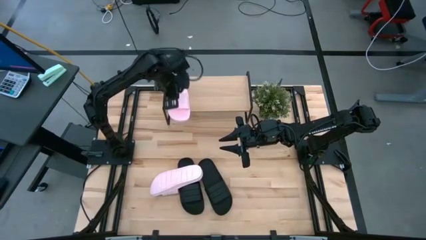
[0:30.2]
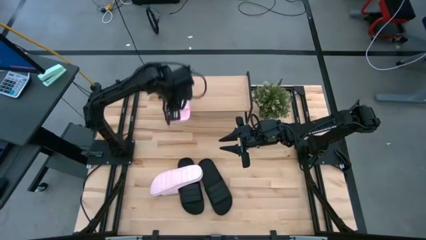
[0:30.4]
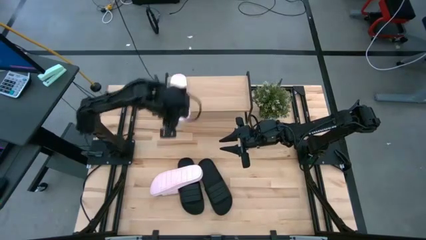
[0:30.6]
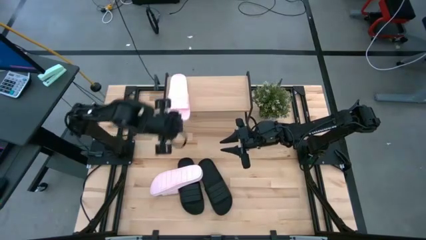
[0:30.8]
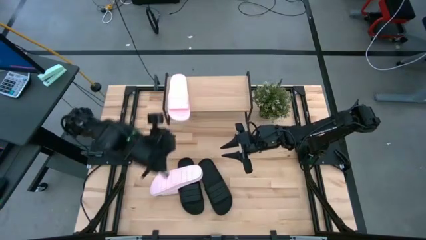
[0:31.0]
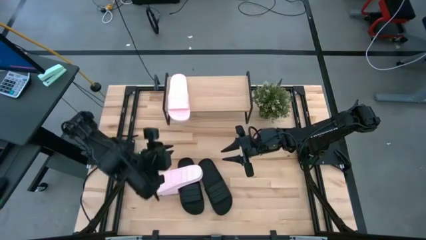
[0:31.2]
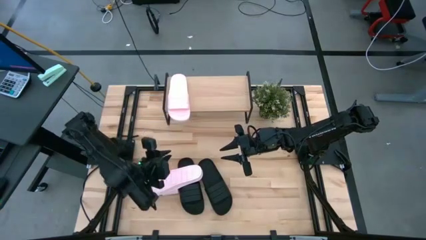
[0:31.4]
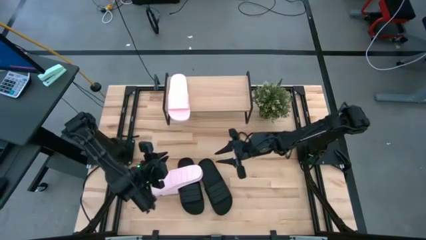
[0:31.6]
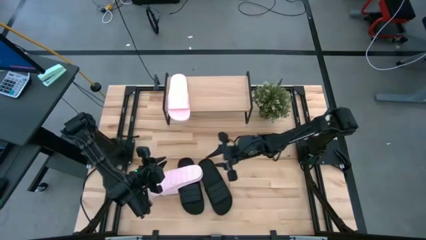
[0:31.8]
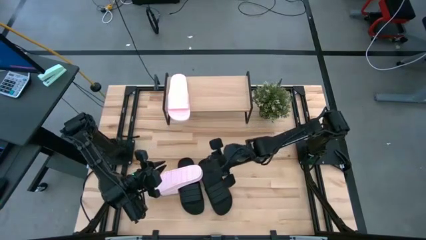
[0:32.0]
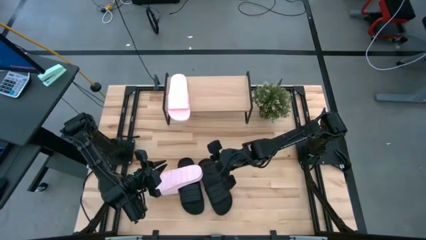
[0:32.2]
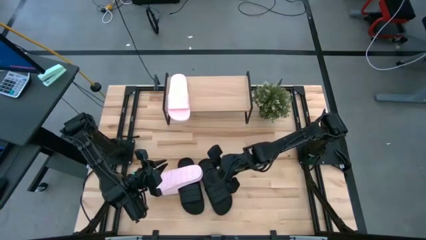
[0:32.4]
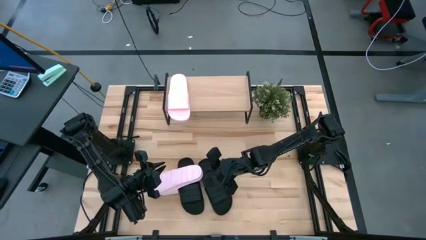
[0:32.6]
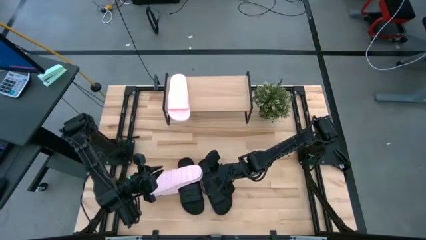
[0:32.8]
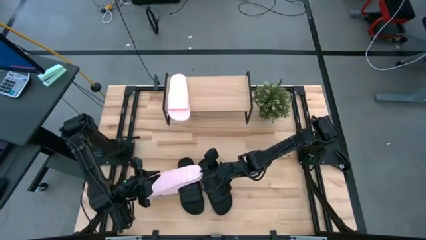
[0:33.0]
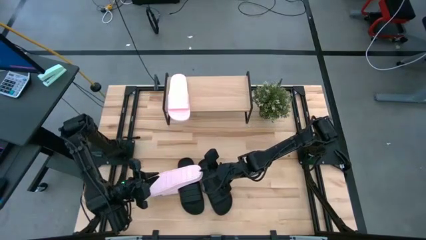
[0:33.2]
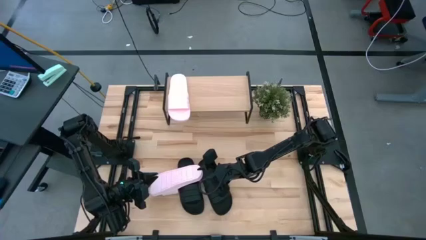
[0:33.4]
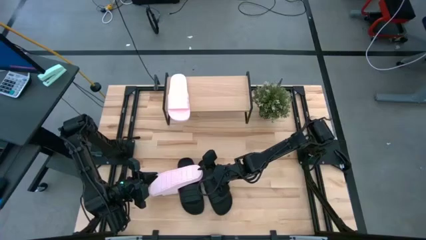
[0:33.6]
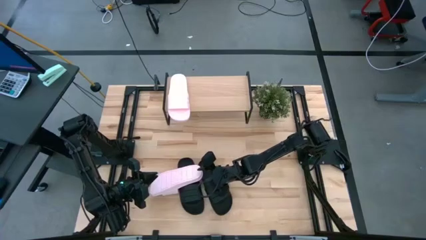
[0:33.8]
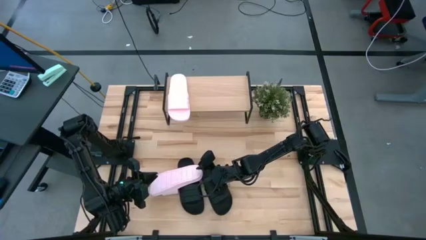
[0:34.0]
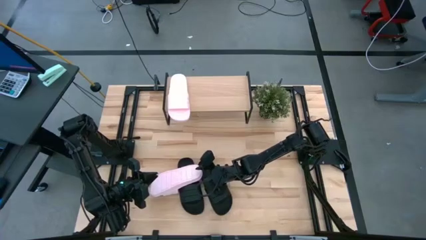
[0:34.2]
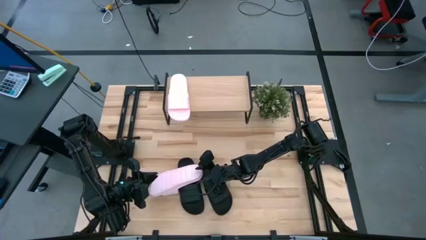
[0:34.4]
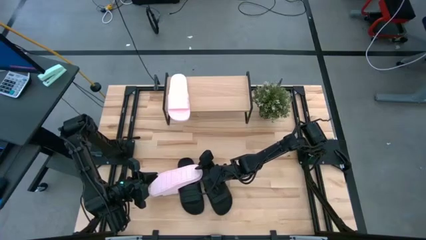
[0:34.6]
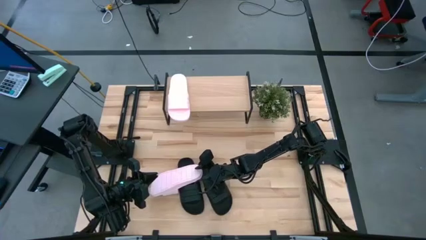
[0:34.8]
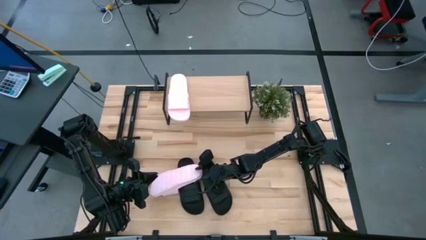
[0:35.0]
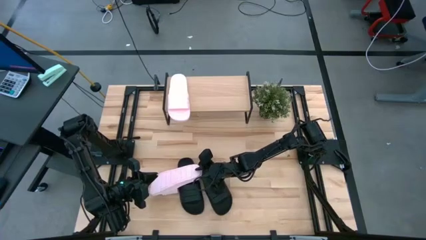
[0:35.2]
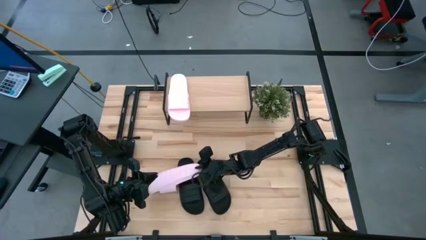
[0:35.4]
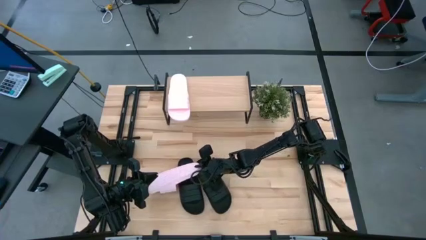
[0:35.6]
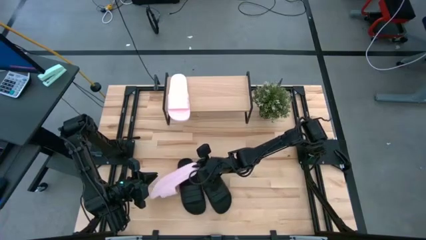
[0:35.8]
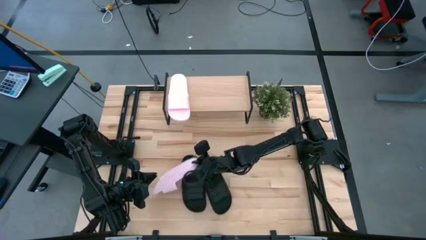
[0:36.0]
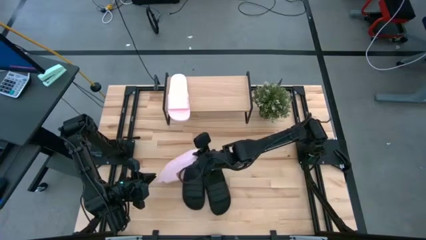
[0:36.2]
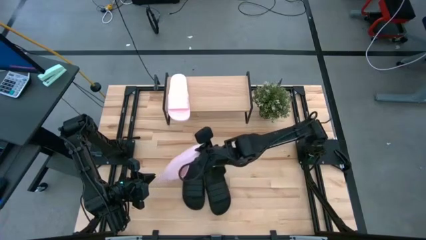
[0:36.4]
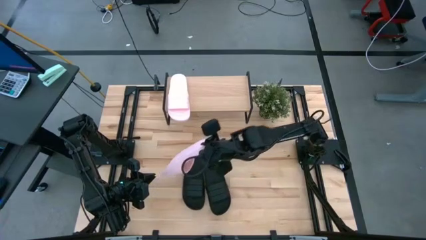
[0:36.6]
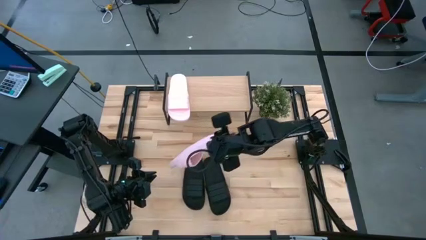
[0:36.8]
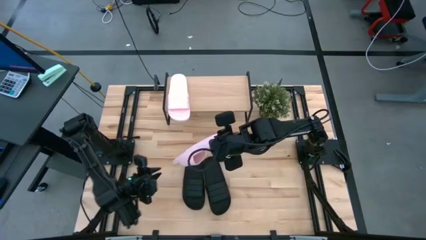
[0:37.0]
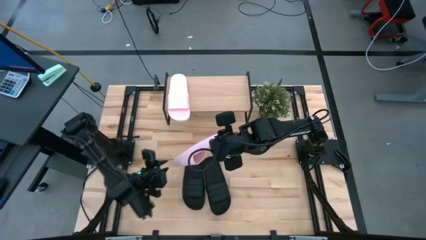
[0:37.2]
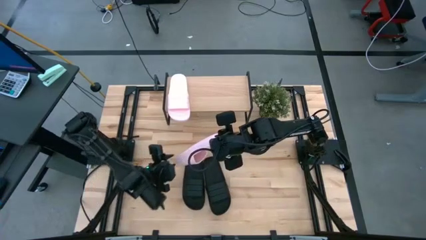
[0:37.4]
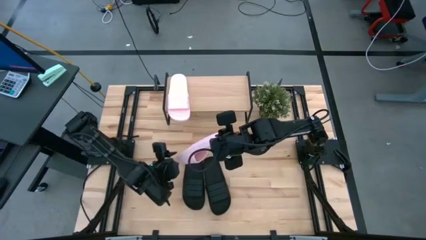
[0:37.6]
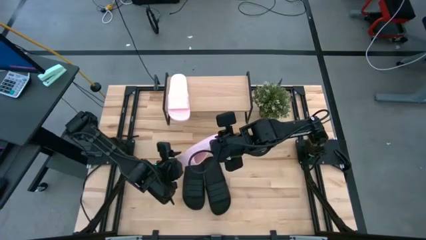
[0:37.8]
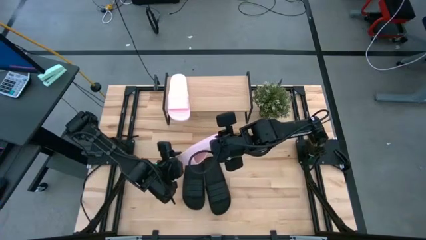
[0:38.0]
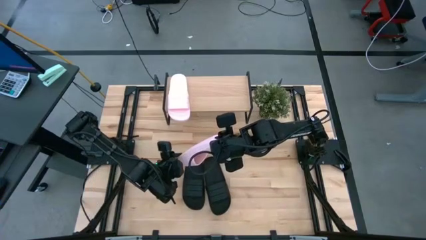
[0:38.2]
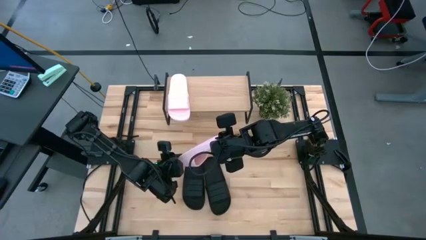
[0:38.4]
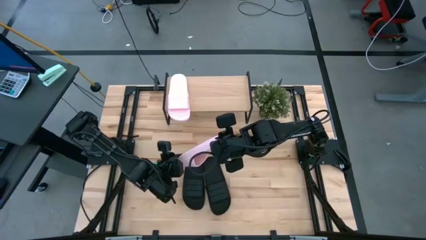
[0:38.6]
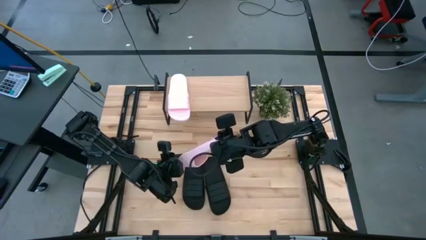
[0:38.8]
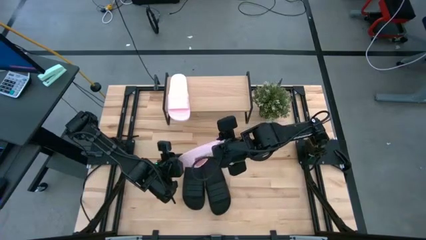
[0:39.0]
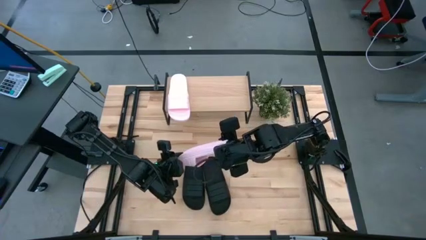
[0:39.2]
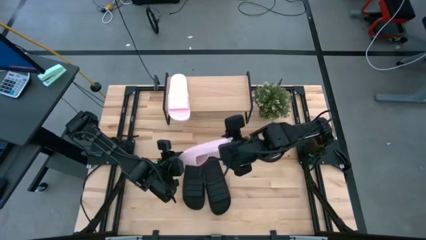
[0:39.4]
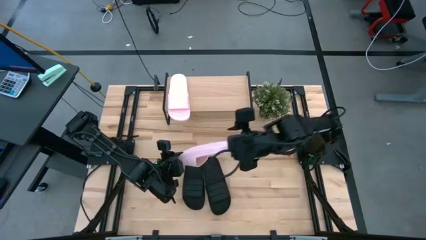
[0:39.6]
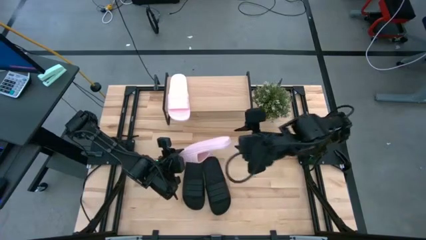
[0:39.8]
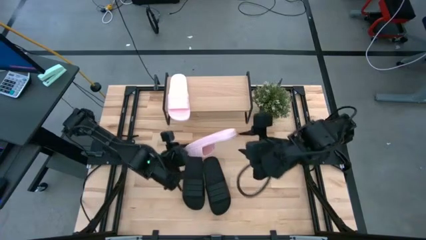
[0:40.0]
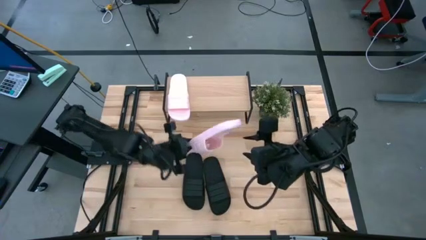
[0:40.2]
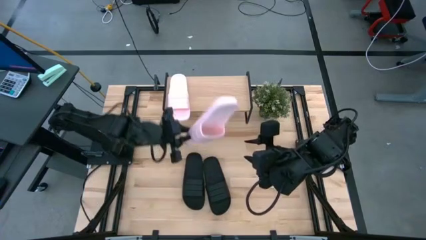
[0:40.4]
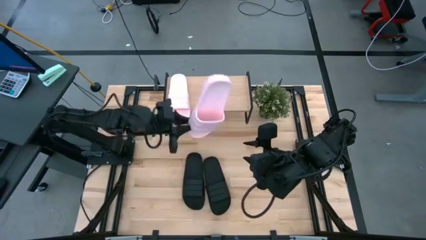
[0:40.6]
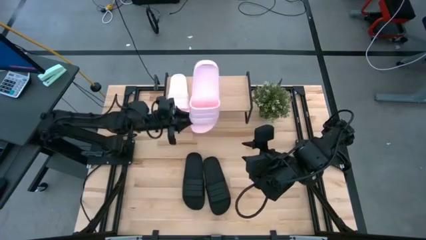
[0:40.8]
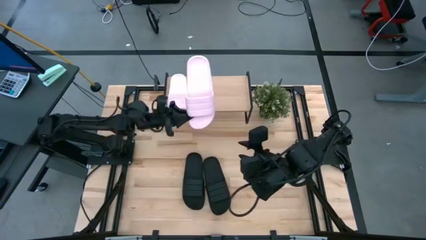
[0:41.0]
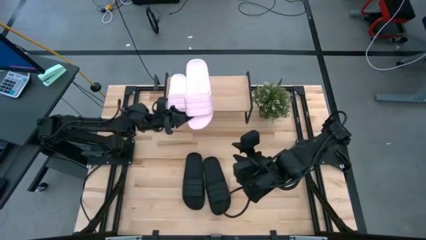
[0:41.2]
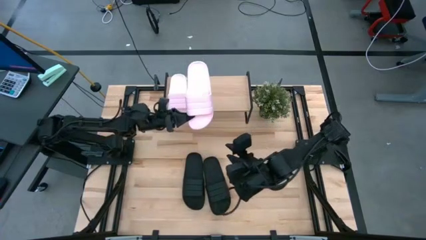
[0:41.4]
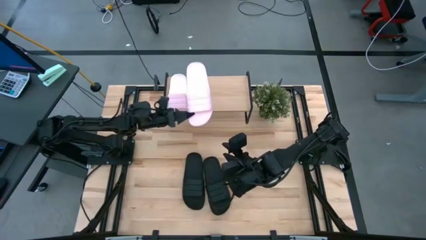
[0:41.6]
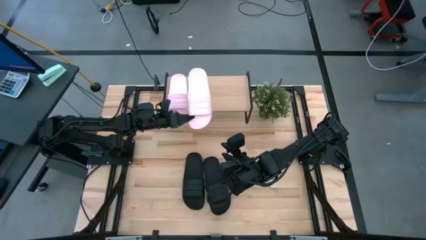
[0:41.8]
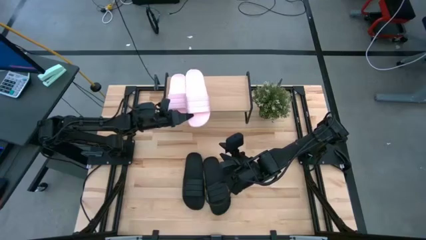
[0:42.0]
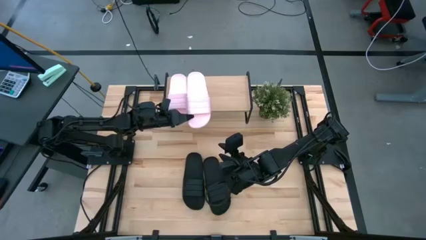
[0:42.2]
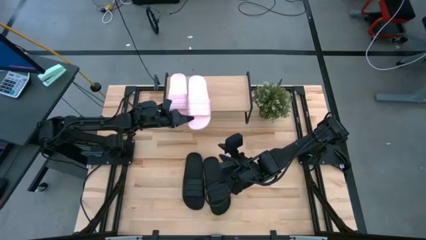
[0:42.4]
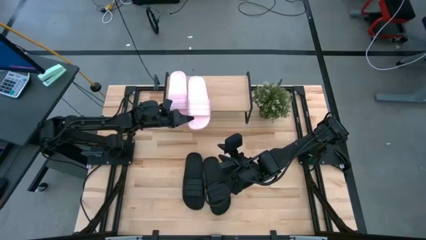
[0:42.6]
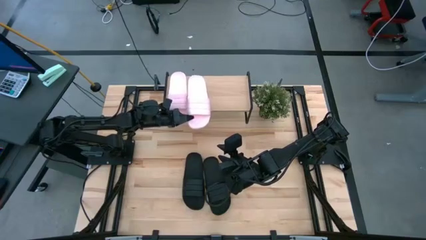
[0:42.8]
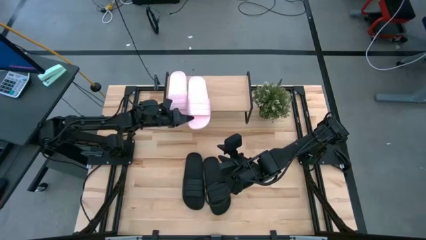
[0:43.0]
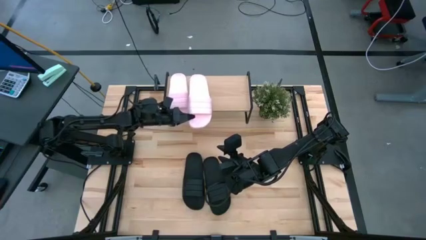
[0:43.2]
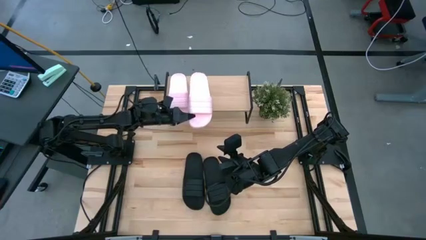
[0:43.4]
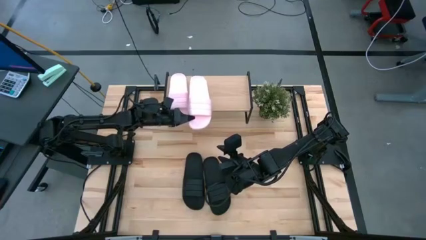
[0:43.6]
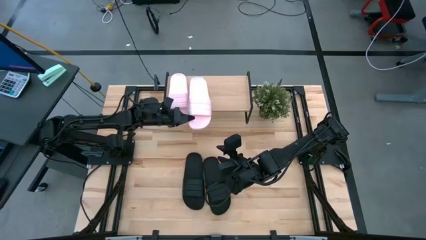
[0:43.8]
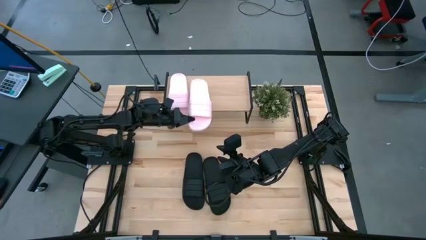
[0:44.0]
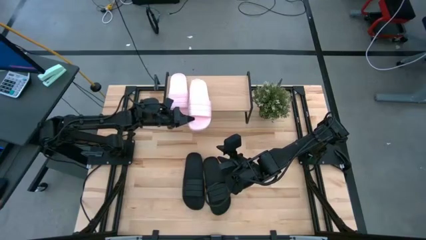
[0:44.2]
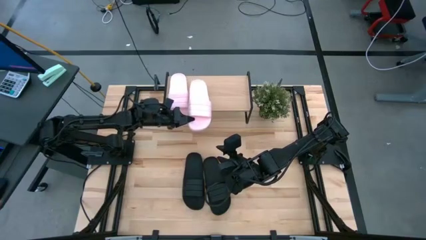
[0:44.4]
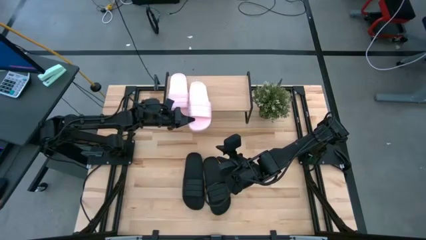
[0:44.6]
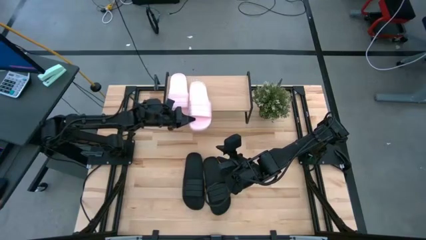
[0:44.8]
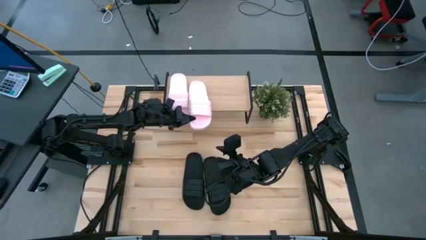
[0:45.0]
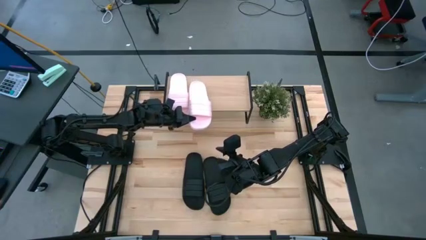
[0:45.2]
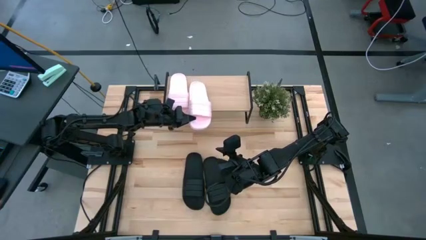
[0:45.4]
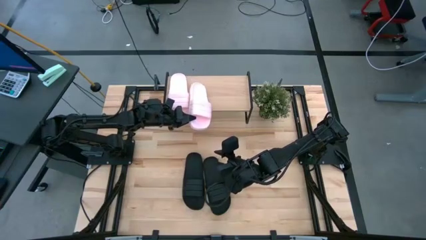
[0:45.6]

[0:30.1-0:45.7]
Task: Pick and place slides into the shelf
Put the pink slide on the shelf
